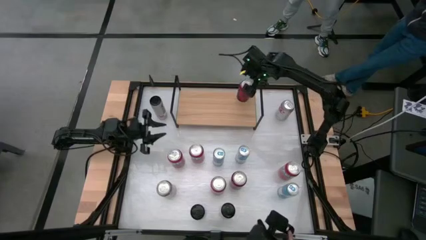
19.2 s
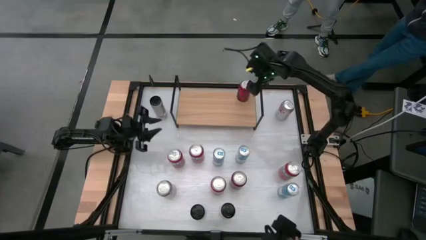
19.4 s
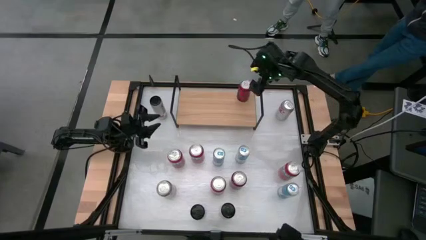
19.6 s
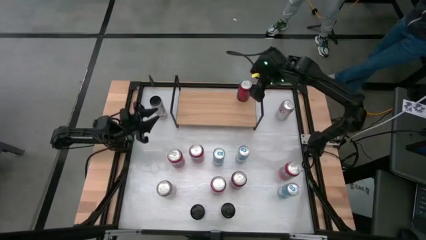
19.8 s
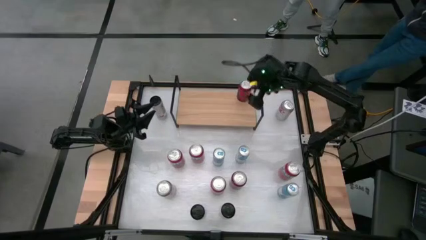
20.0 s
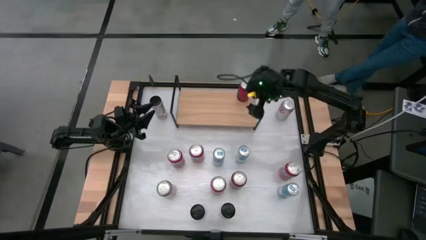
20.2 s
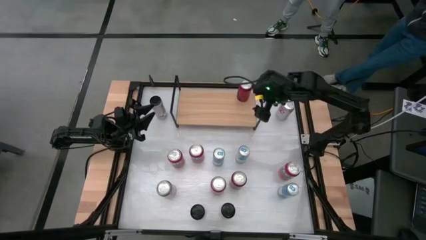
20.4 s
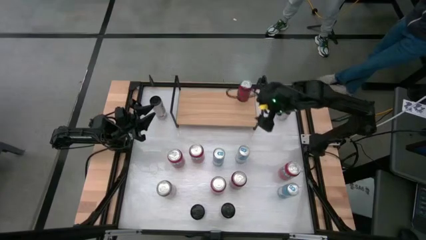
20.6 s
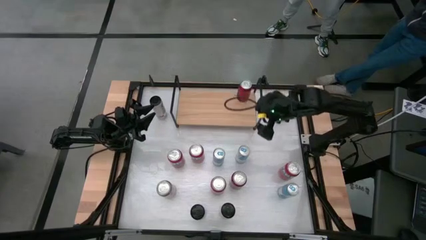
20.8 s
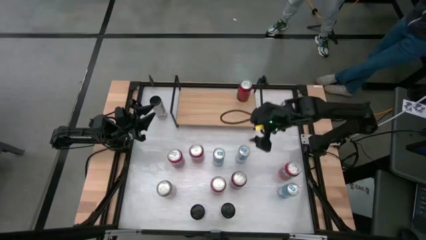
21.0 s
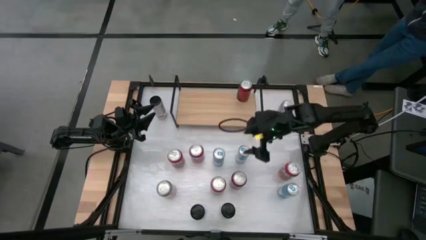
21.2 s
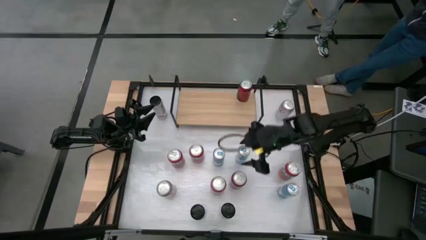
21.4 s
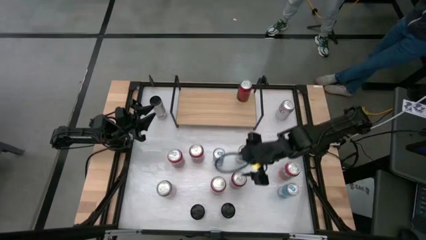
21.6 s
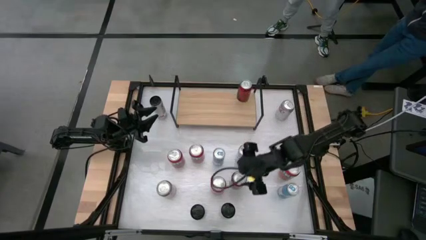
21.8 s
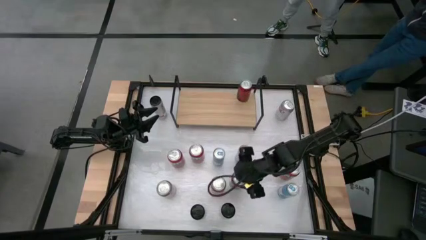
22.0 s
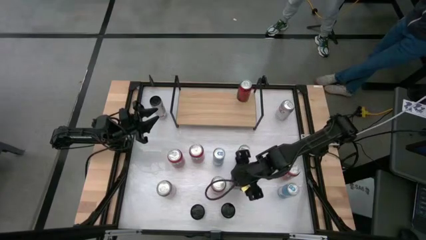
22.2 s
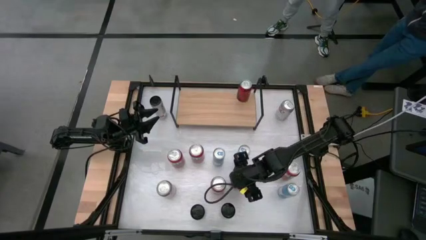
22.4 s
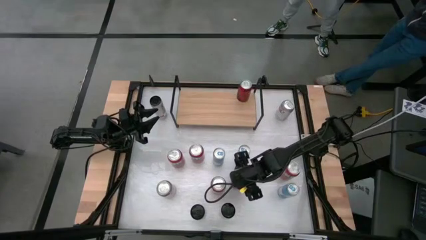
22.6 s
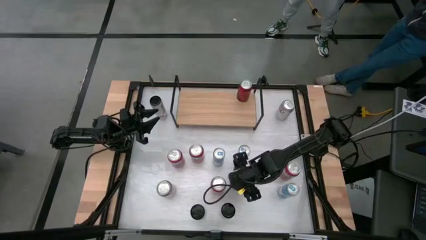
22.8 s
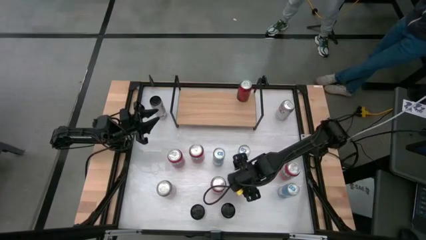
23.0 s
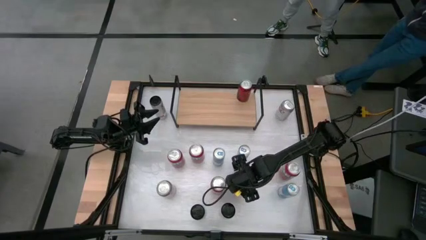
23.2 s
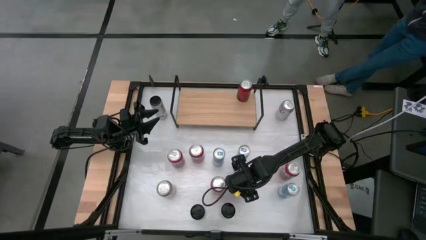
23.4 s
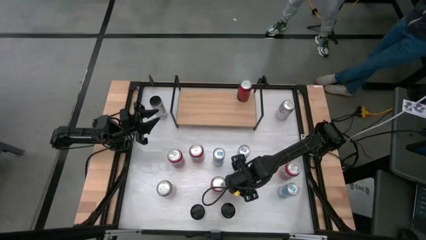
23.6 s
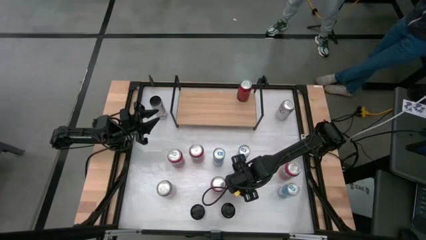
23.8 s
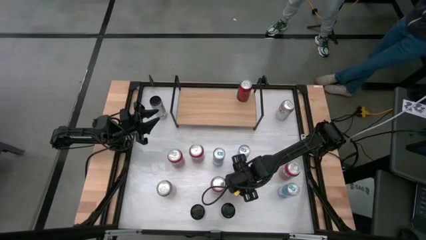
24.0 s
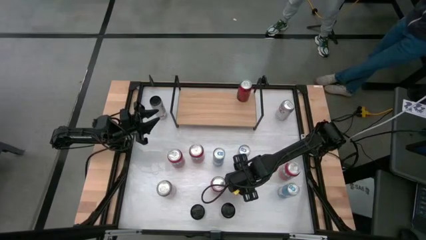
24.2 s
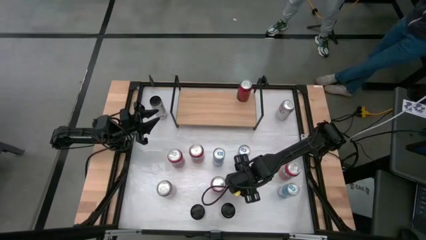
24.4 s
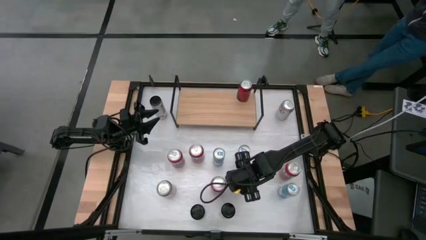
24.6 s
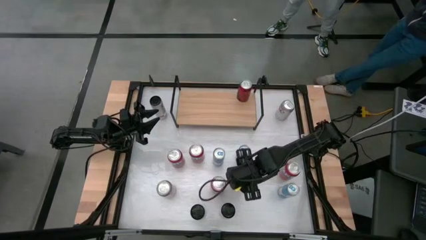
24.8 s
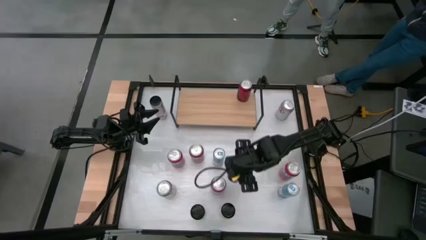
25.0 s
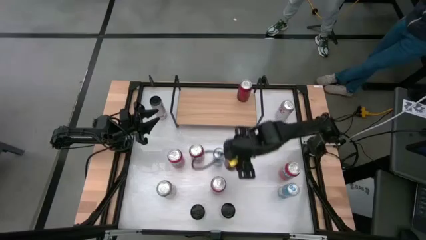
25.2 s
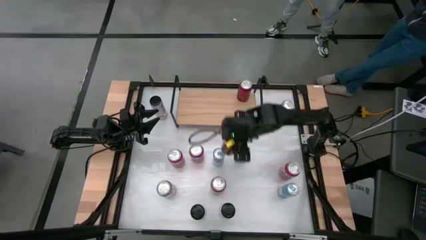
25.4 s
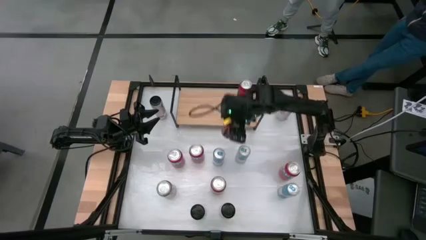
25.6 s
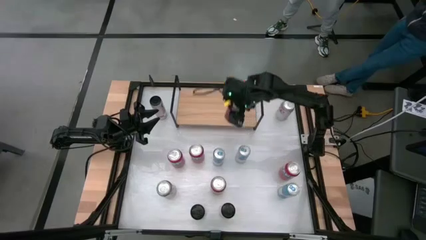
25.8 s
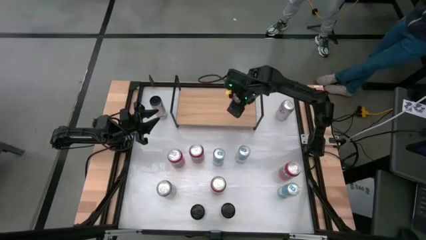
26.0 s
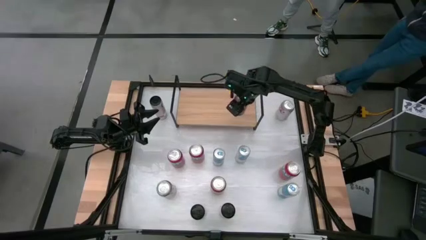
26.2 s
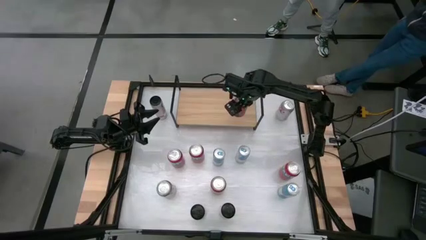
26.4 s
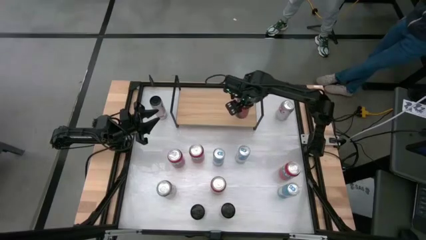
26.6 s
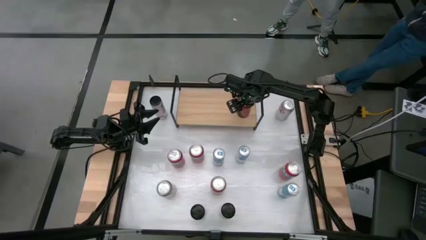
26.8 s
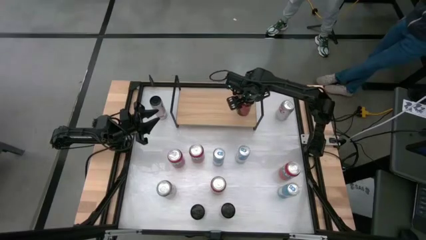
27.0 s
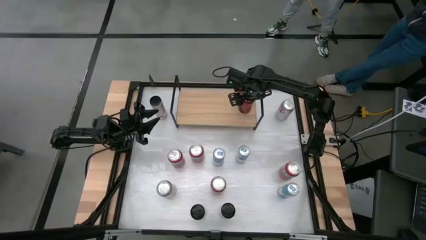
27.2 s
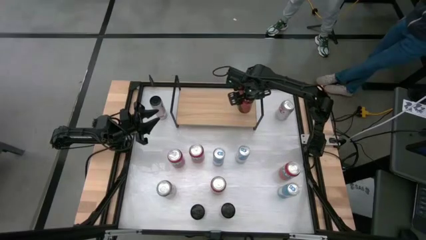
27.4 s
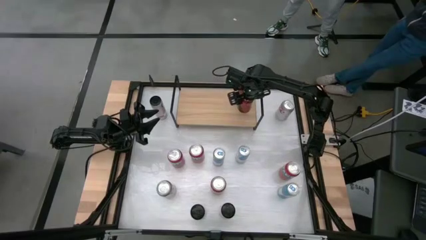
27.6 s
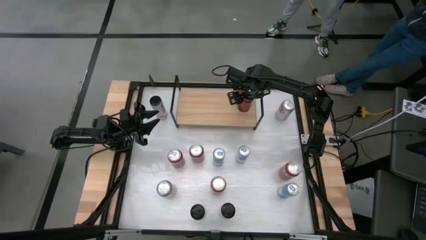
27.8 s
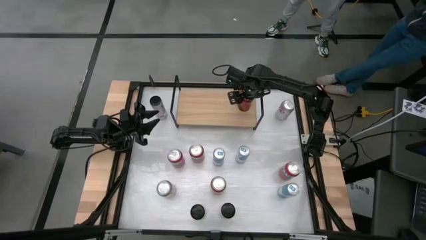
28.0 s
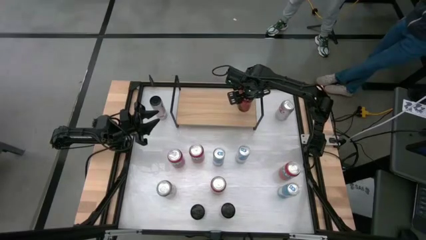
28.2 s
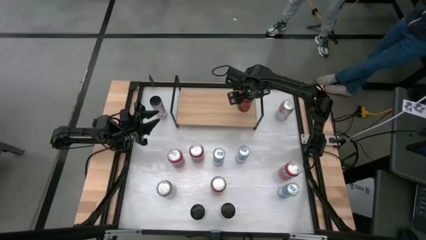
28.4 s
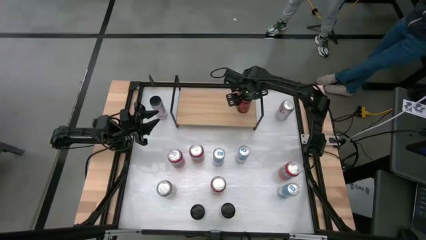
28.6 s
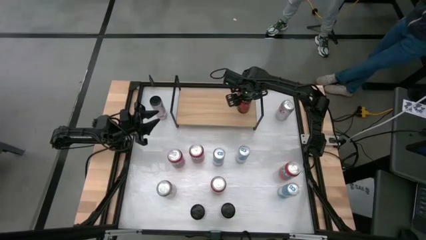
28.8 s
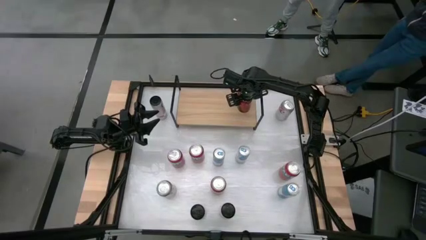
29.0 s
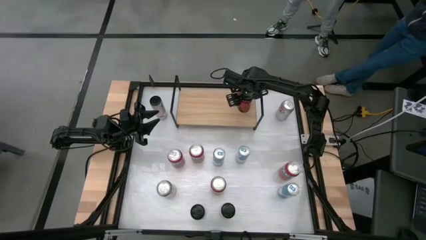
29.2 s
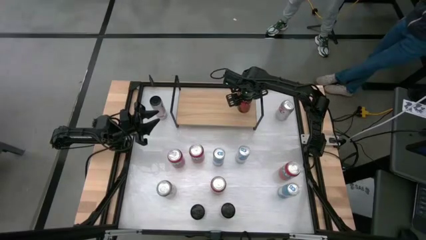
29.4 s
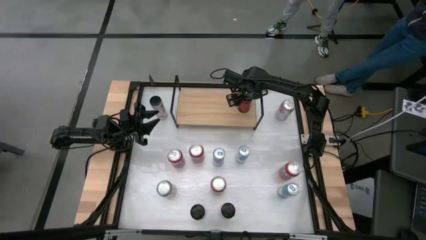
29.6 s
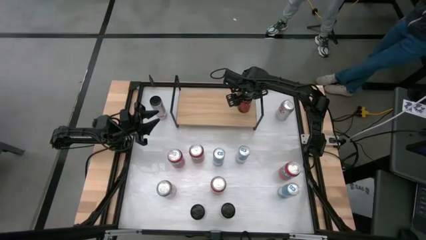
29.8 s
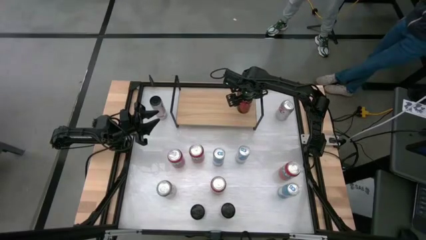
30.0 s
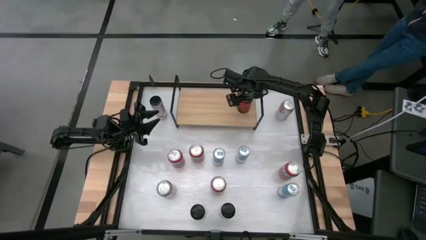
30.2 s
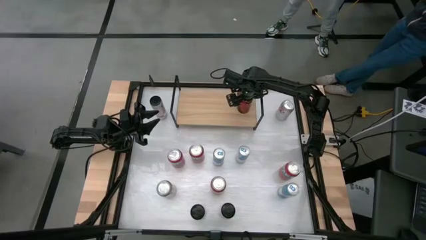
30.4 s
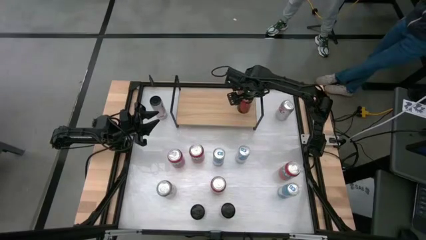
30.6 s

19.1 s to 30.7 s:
Task: Place canned beverage on shelf
Put the red and black soda can on the shelf aligned with other red soda can
